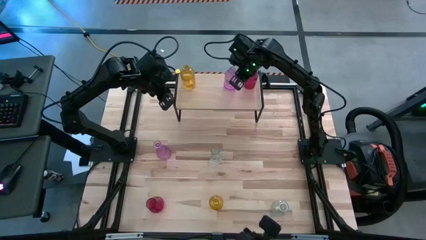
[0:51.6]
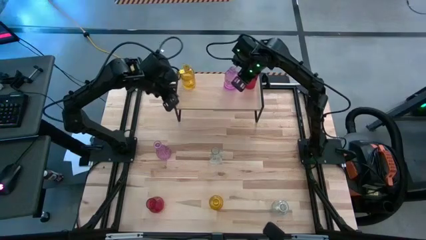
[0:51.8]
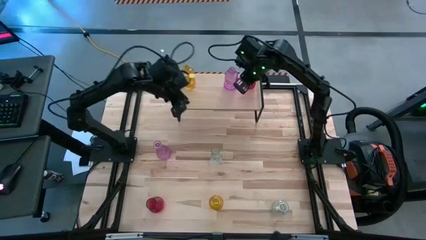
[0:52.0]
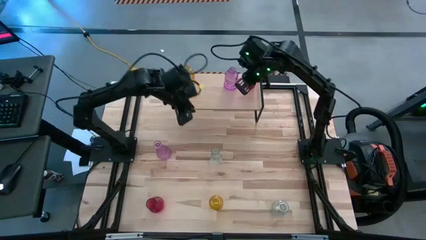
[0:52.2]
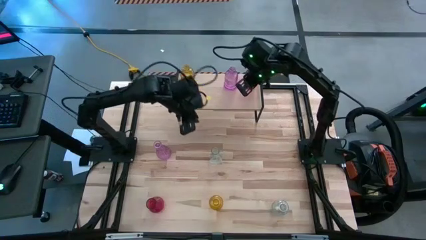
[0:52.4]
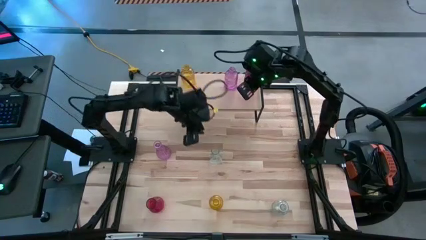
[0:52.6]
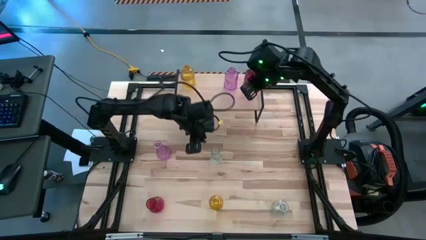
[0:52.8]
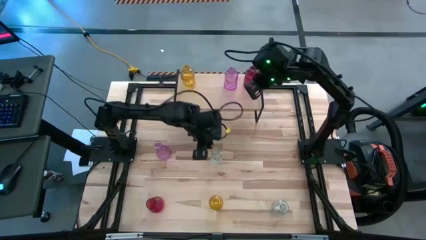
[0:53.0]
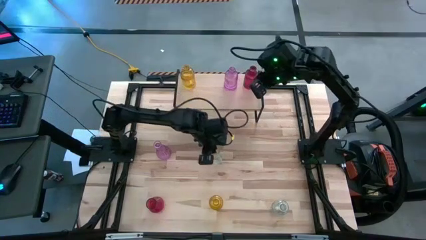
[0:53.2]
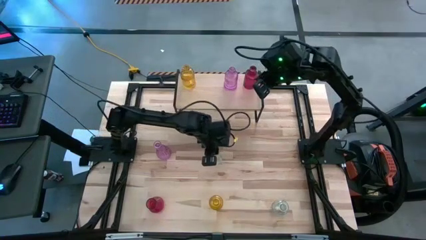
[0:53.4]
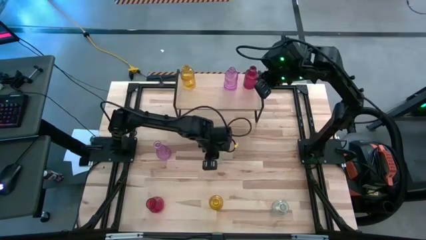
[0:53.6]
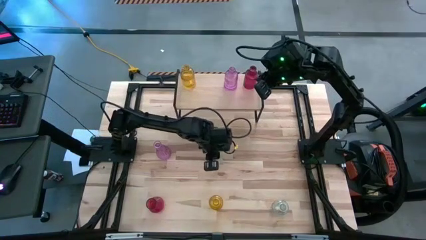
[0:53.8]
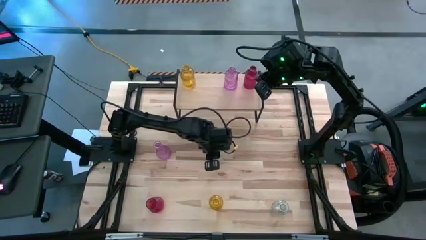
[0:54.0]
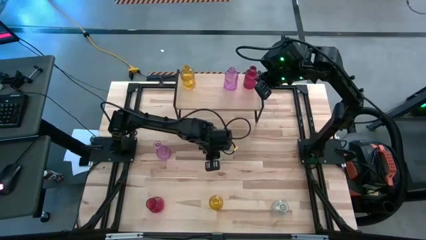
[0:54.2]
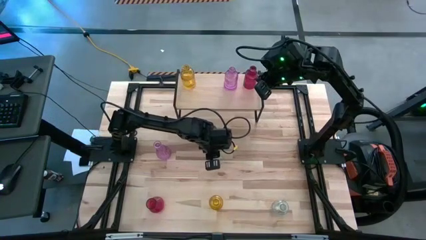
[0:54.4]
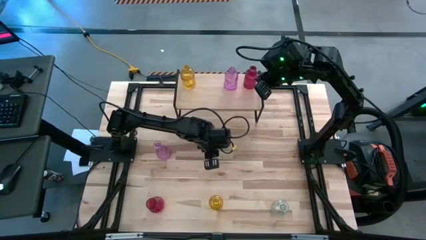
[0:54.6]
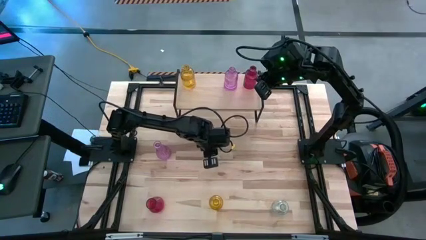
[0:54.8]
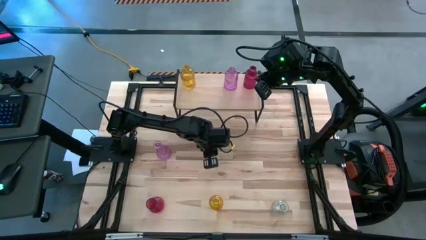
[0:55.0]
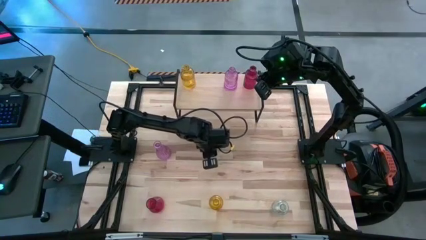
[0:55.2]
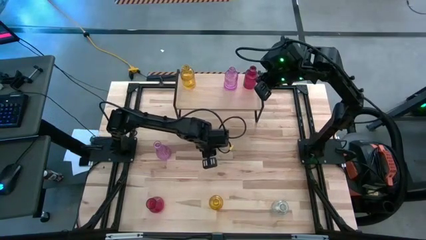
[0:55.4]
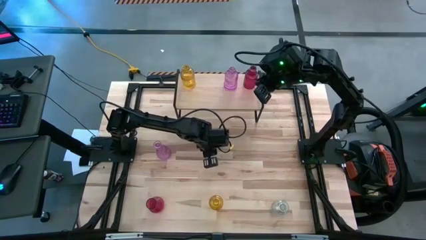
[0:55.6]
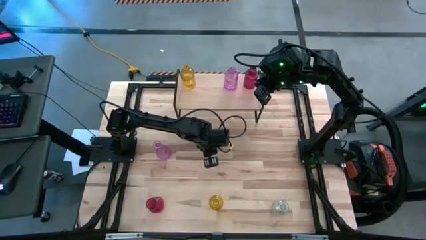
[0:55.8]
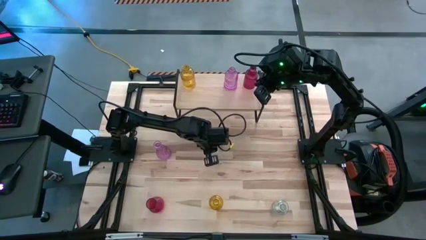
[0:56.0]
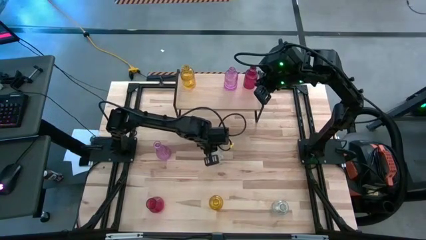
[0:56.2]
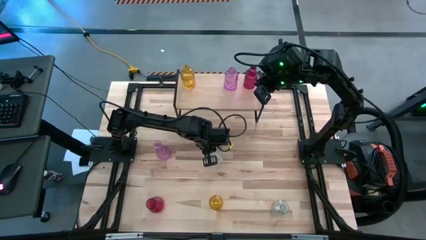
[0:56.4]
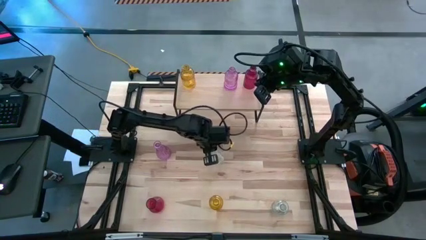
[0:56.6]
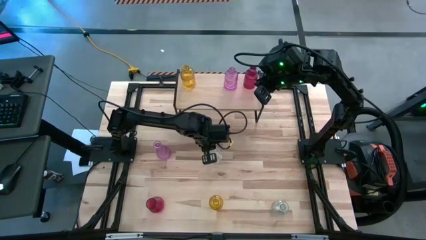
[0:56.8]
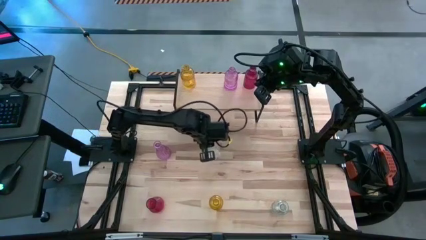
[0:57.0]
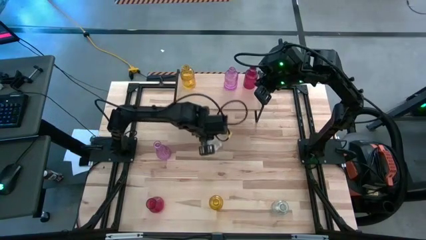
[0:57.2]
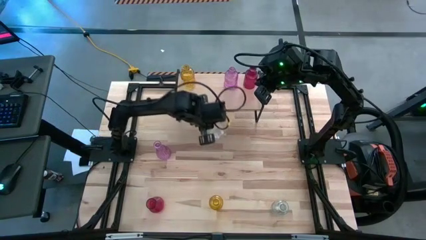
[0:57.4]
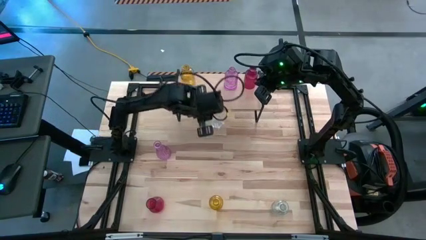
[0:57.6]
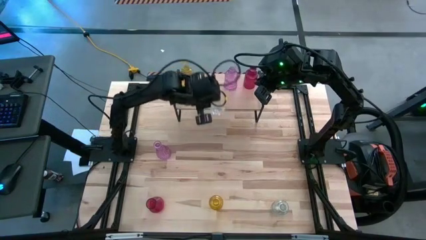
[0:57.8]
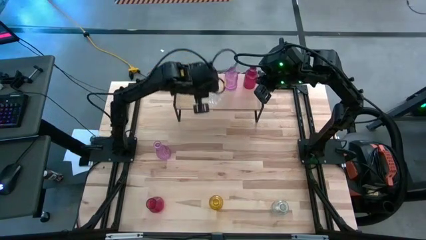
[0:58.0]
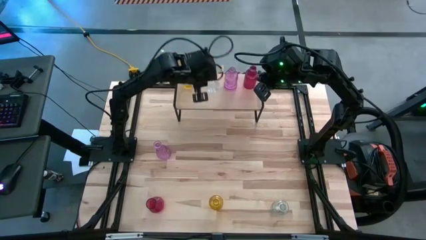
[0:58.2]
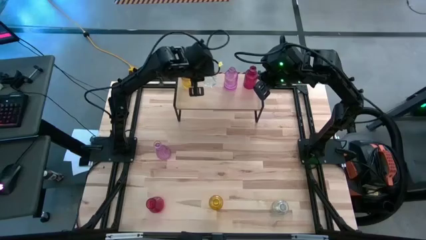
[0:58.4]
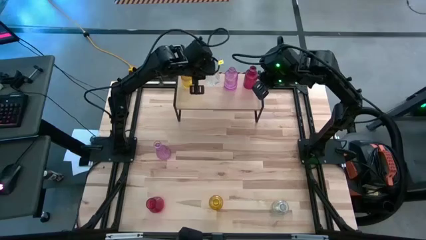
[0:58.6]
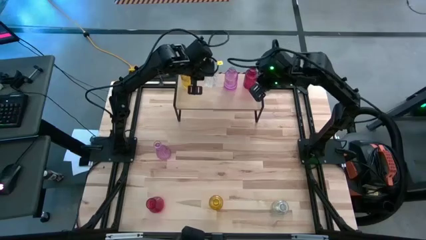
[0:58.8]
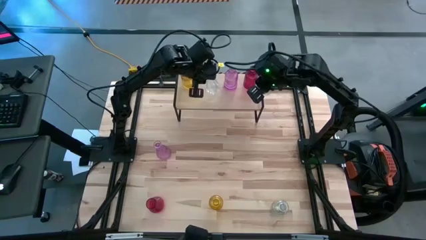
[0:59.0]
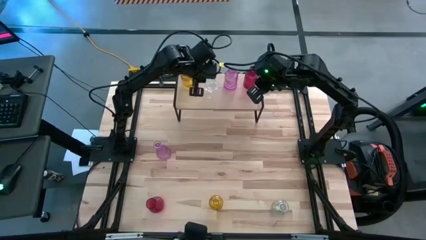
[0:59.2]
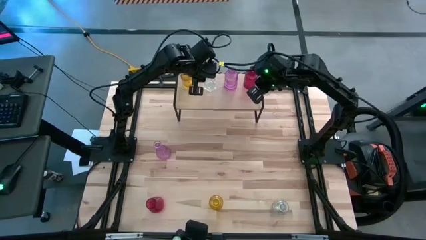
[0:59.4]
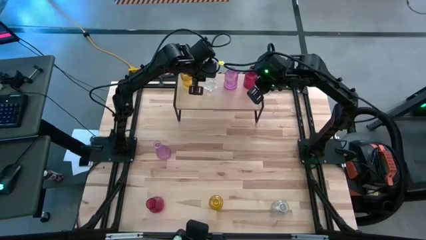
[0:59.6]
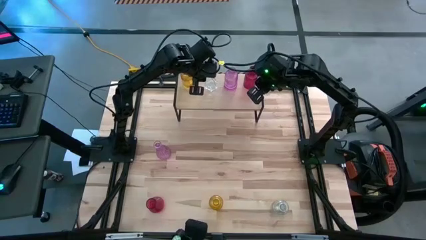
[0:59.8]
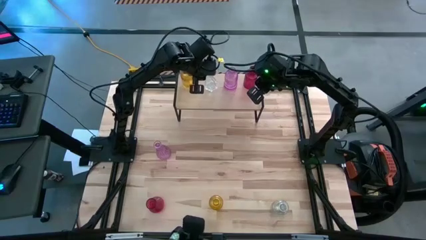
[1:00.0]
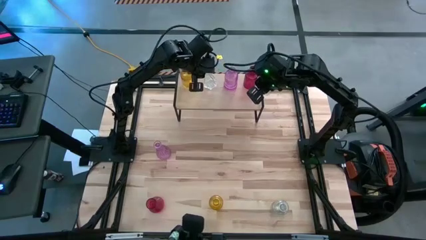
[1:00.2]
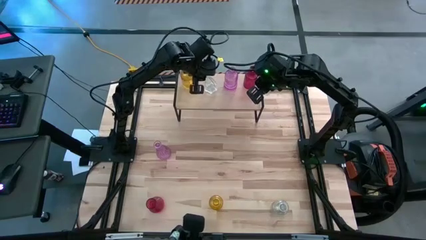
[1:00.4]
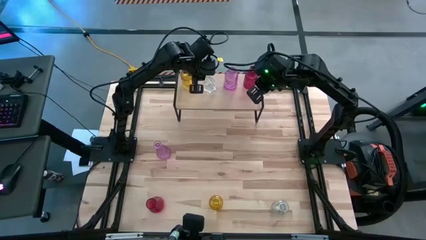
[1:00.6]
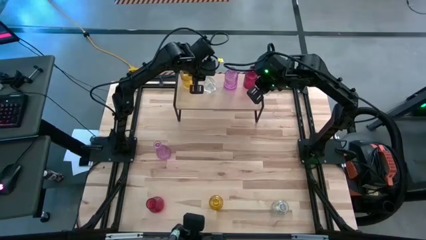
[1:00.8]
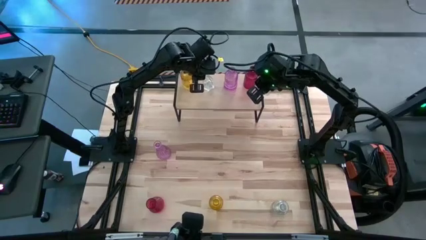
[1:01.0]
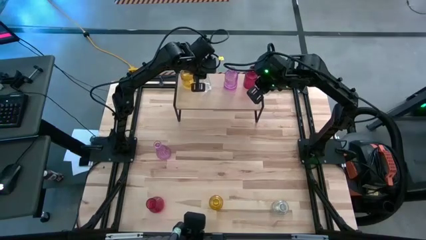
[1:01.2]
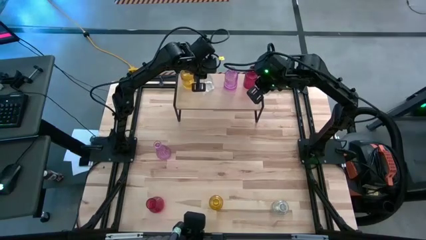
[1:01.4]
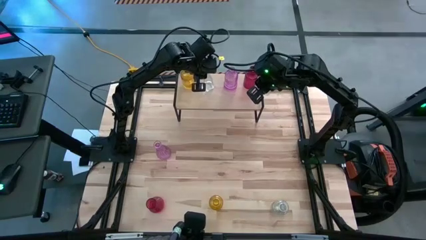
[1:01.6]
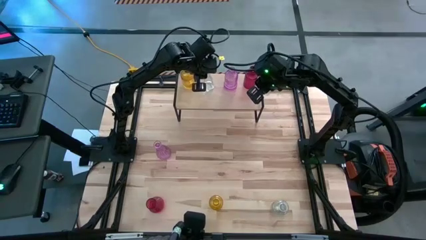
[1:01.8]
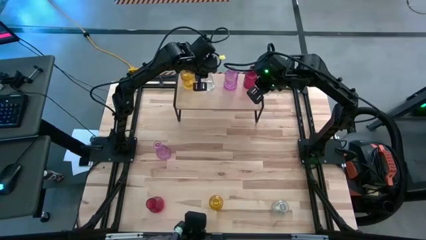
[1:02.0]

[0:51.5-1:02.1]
Task: sort vases onto shelf
Put the left transparent vase on the shelf

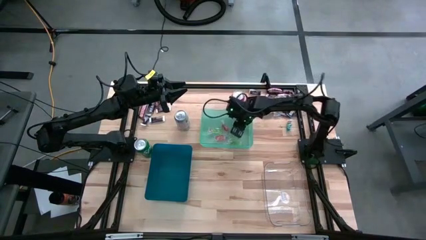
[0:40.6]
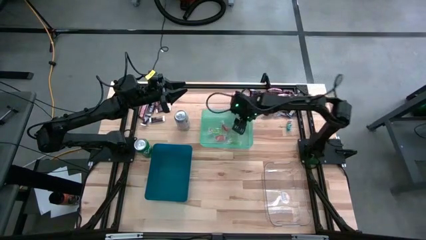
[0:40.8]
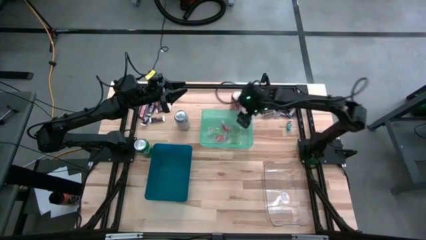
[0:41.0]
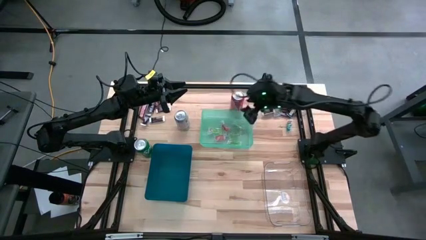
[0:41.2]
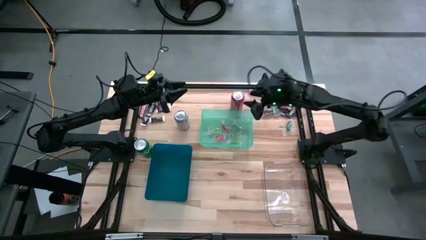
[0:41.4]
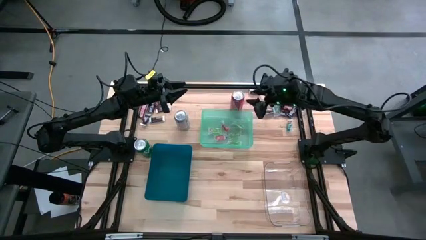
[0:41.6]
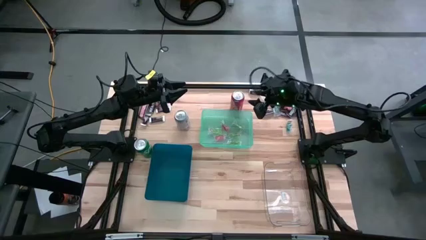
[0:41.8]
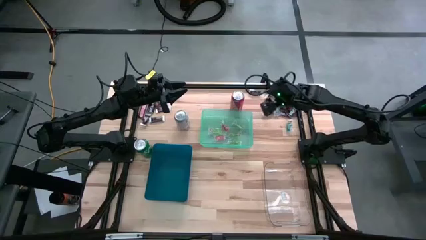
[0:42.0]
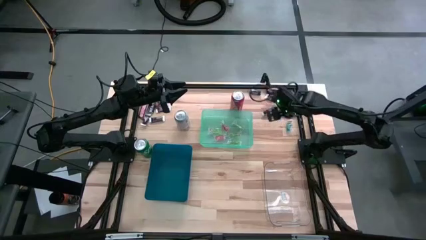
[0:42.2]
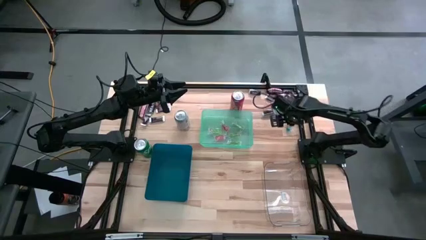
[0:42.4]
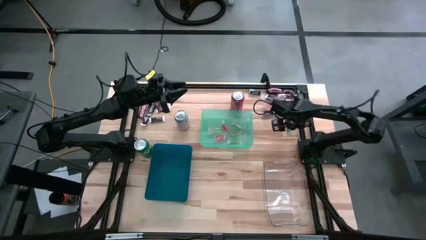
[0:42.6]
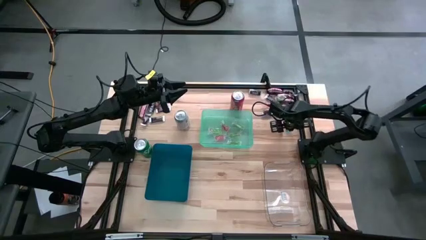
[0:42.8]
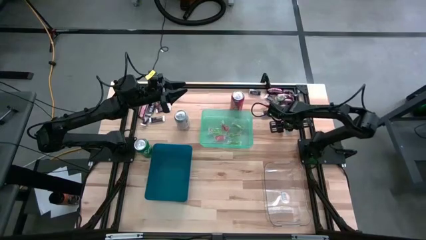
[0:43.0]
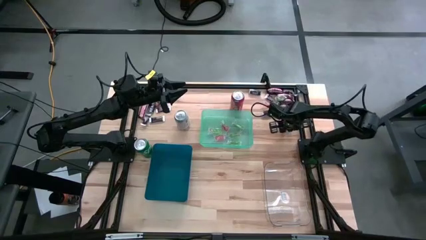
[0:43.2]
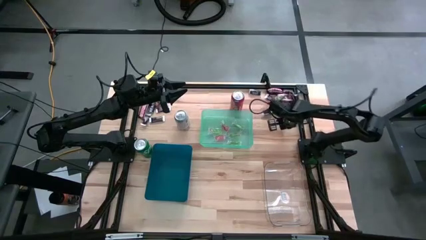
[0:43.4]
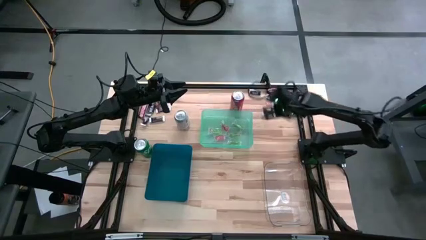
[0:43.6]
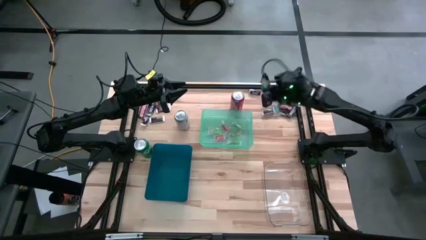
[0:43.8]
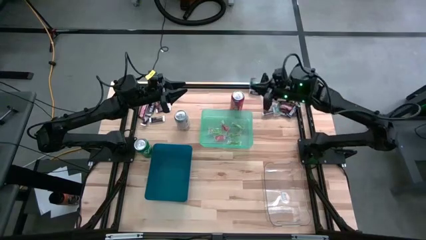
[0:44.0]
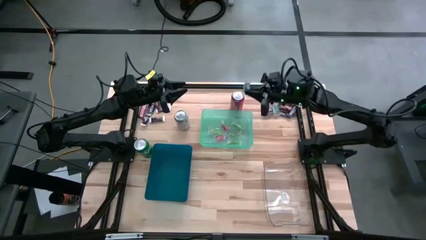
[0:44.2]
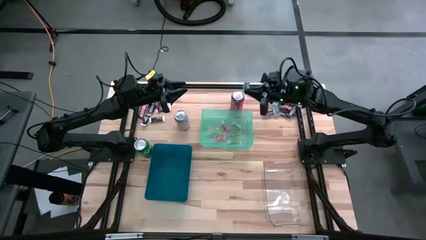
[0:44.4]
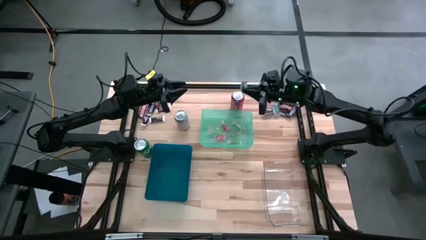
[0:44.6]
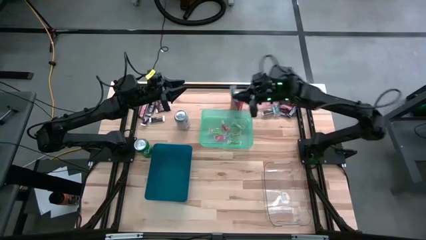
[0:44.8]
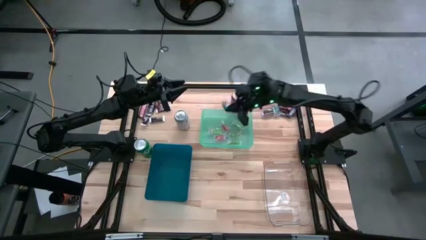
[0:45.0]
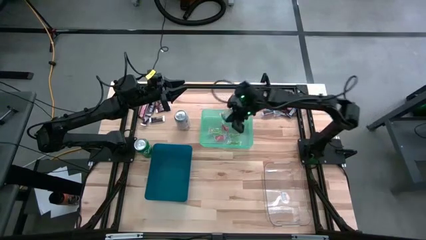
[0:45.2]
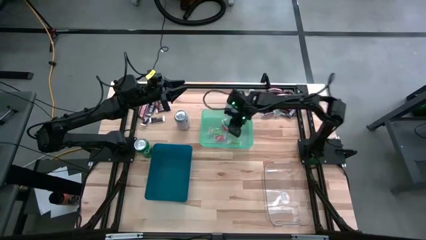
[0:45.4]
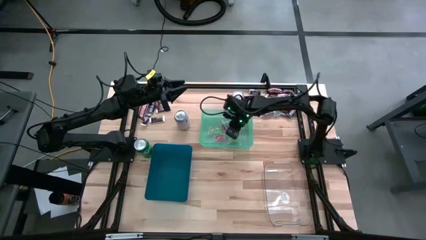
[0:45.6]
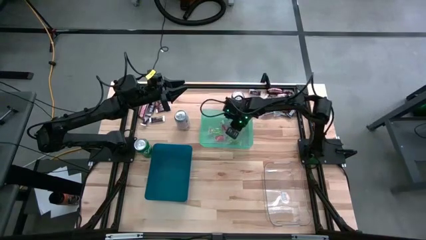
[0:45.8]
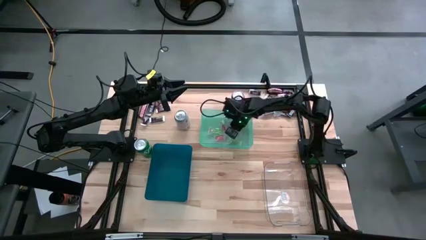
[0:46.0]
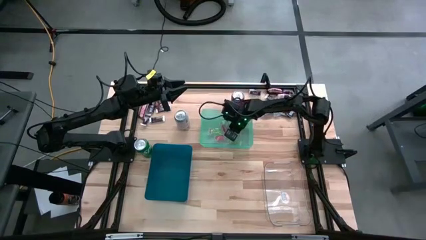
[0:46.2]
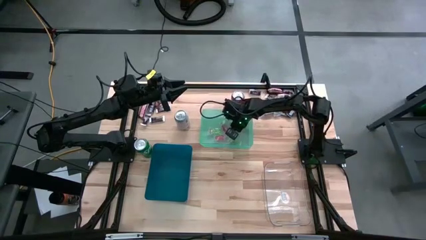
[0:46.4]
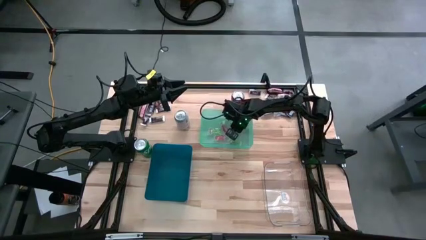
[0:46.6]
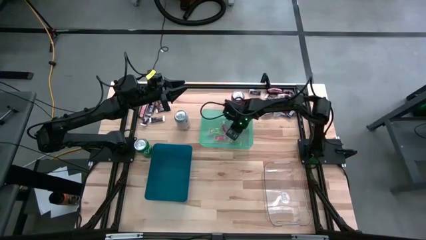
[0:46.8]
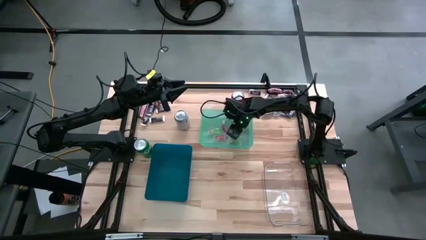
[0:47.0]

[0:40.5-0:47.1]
Task: Organize candy in baskets
Put the blue gummy into the green bin
